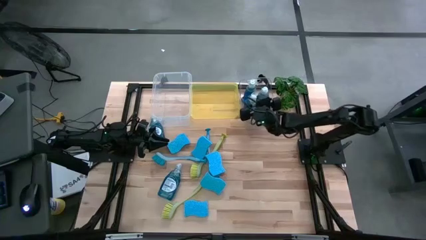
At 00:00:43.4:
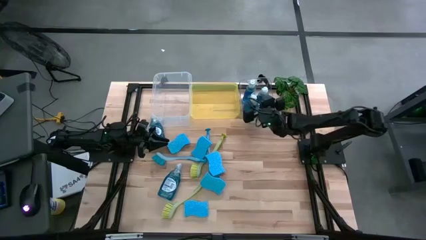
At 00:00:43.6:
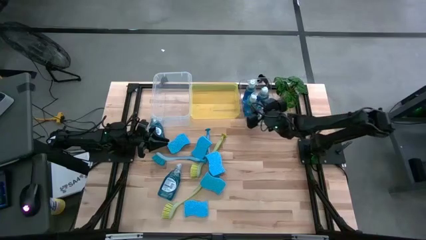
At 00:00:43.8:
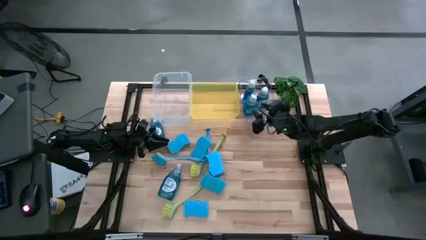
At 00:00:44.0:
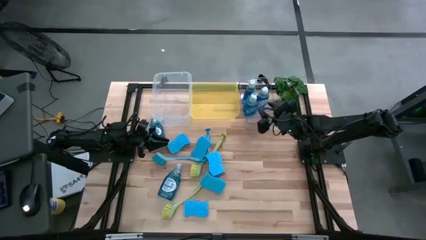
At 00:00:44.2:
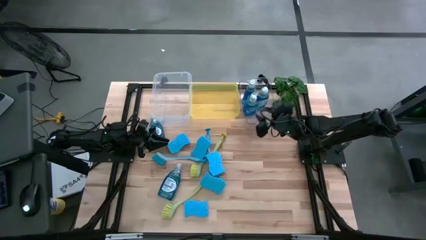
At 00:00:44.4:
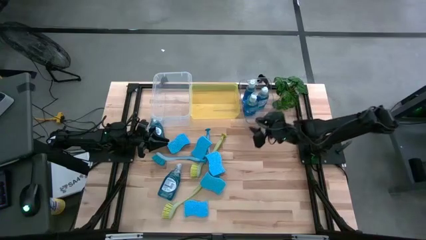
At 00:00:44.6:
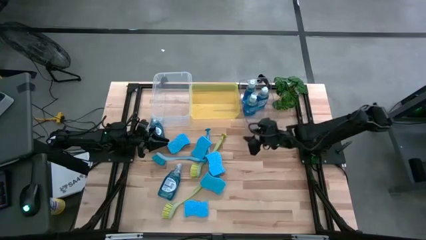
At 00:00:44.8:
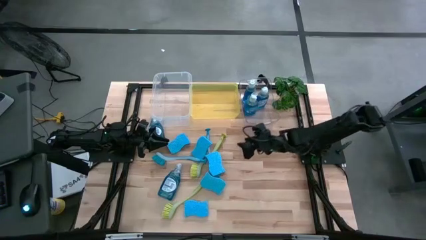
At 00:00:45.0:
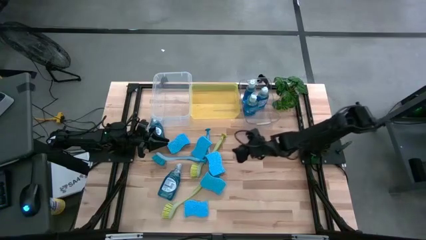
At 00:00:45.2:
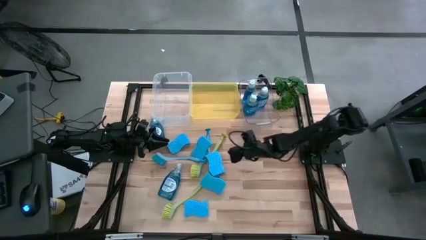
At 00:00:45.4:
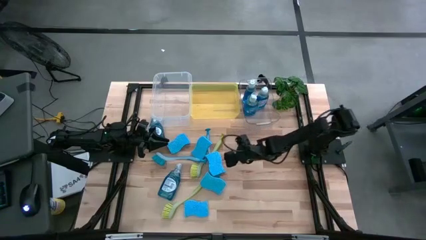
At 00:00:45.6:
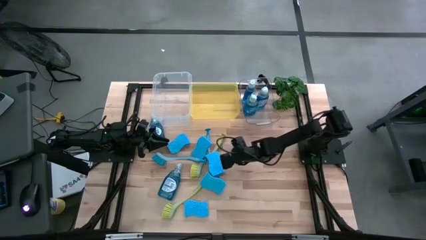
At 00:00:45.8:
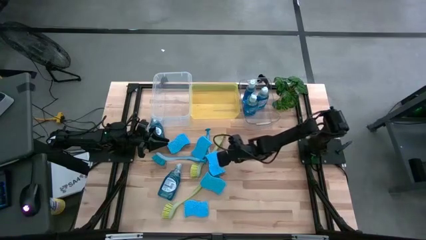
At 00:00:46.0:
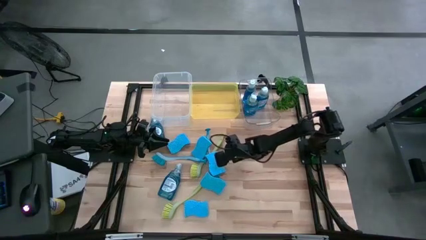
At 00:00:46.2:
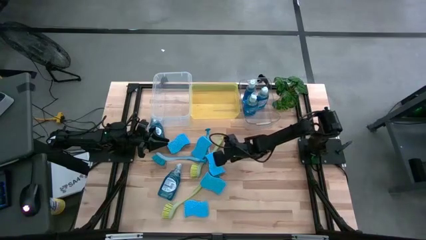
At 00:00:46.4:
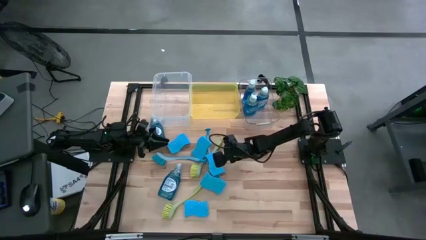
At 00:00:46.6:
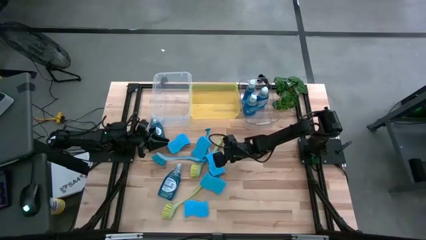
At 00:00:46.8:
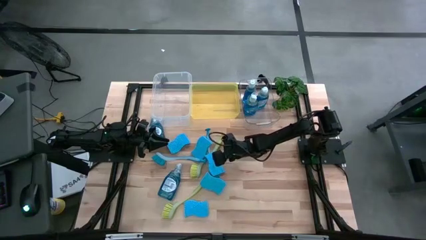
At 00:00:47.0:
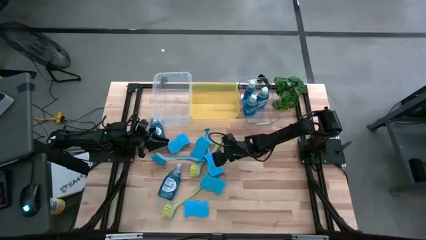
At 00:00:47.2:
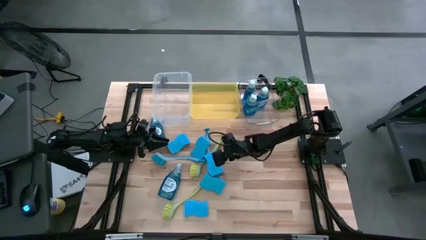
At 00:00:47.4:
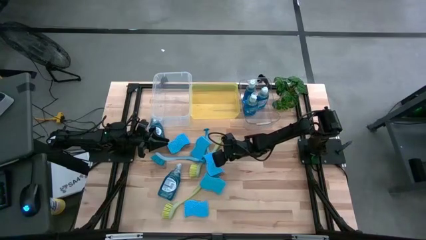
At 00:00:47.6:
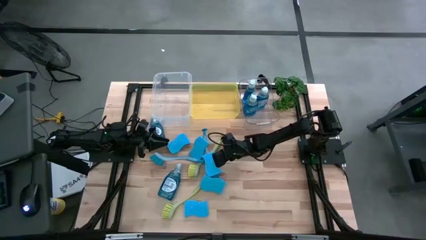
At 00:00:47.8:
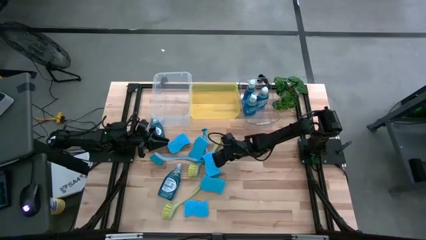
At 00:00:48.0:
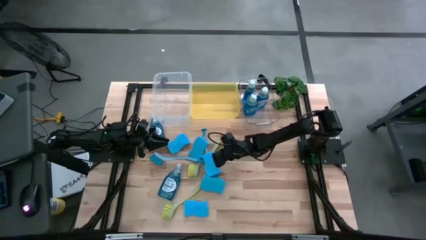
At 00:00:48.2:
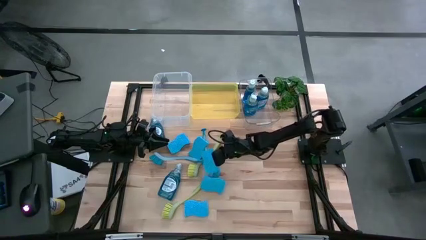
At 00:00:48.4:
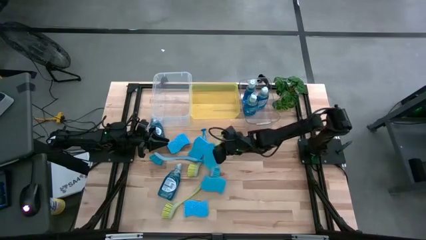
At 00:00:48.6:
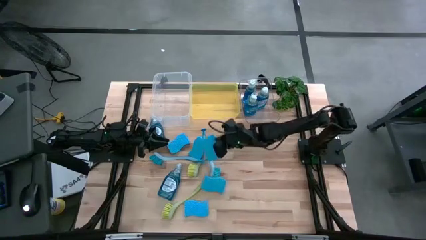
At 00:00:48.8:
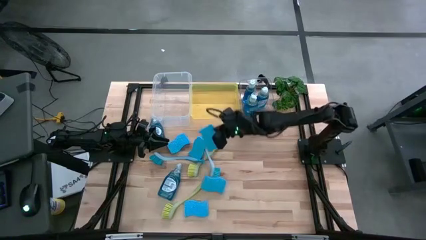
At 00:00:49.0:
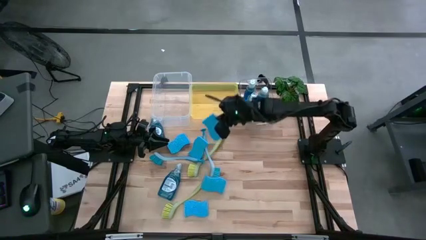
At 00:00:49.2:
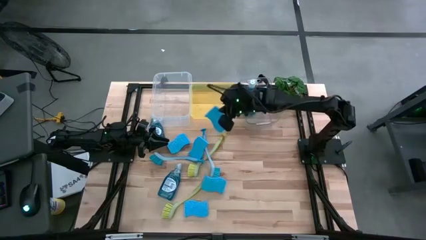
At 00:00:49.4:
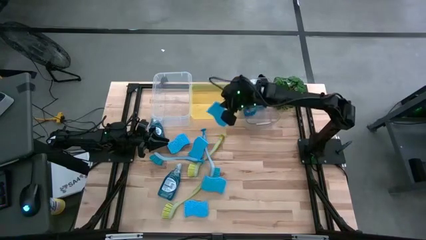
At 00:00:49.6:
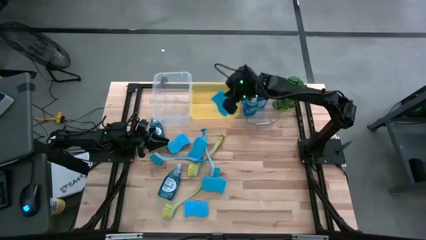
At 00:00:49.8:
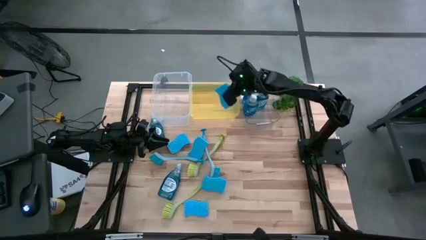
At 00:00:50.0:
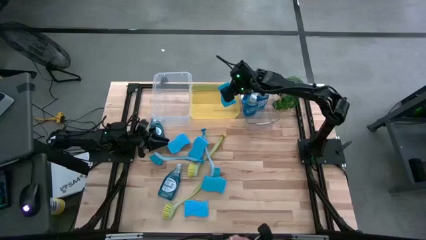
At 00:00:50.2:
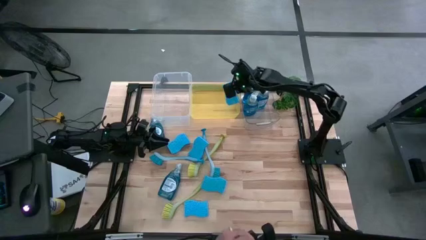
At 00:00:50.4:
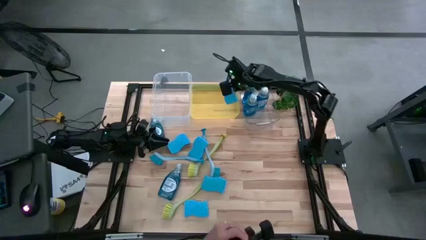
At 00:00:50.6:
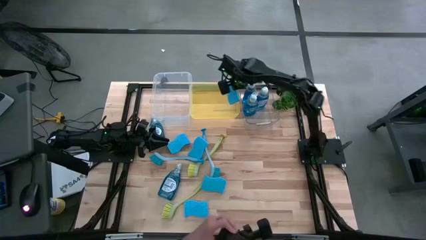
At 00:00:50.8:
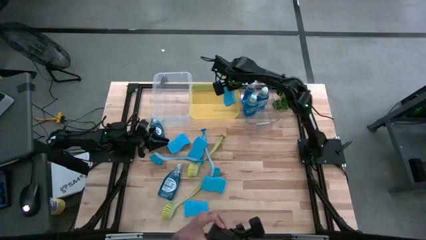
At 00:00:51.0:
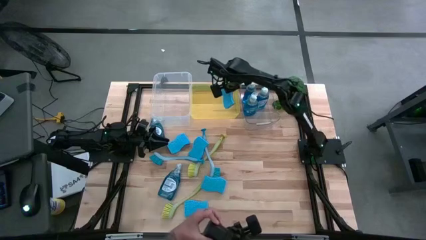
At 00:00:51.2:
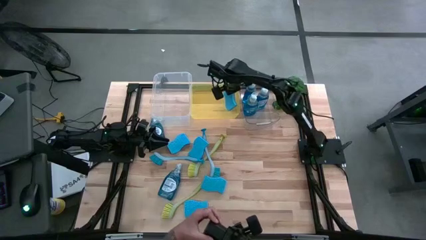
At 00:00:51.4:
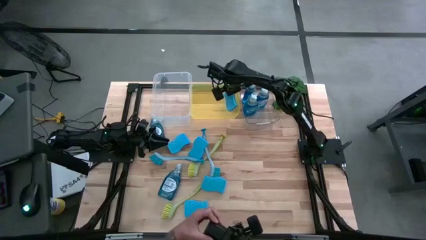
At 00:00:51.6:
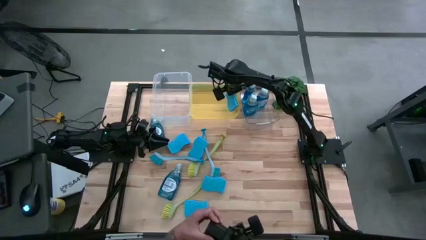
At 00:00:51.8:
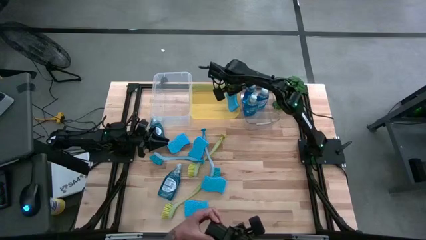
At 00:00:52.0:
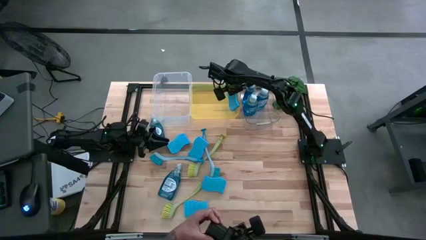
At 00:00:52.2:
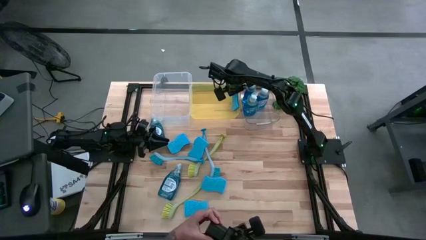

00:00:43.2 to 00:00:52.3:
Task: Pick & Place Kitchen Sink Supplies
Put the blue sponge into the yellow bin

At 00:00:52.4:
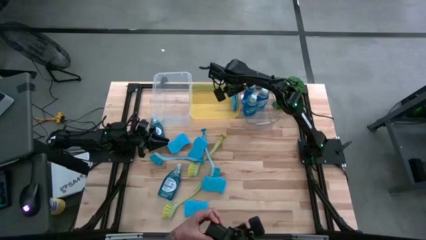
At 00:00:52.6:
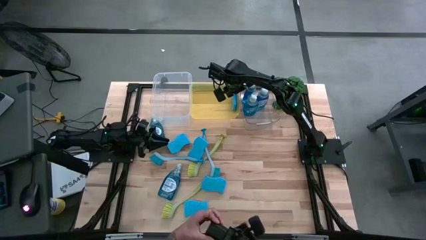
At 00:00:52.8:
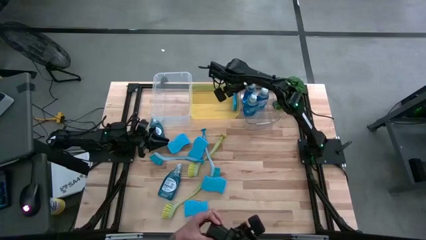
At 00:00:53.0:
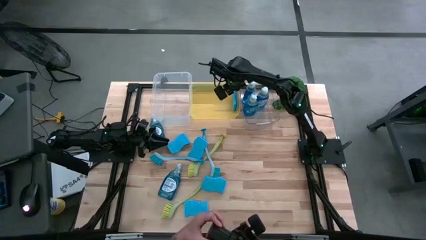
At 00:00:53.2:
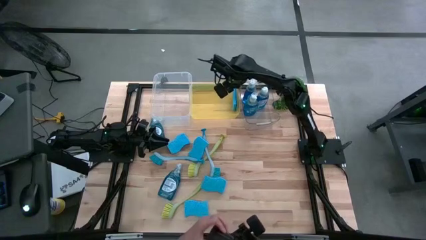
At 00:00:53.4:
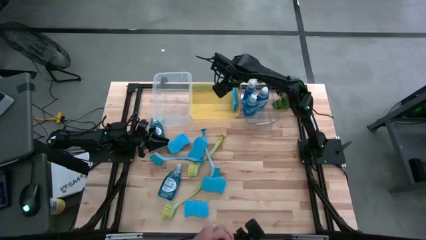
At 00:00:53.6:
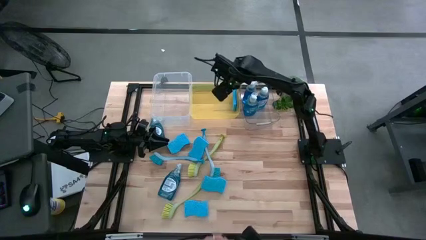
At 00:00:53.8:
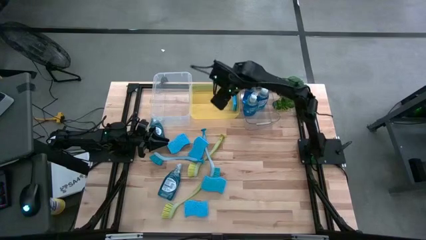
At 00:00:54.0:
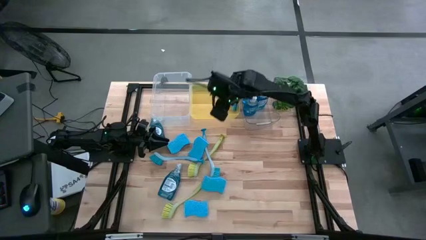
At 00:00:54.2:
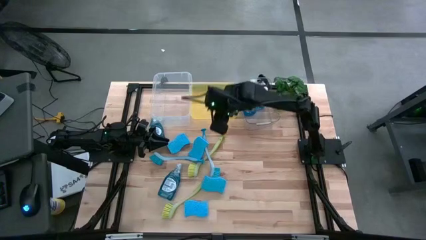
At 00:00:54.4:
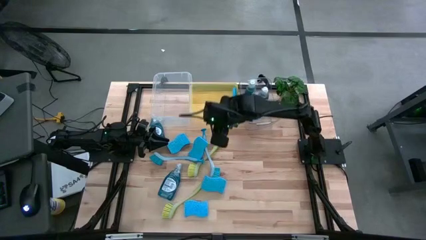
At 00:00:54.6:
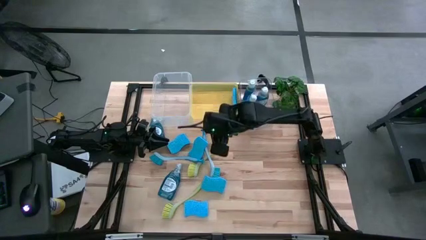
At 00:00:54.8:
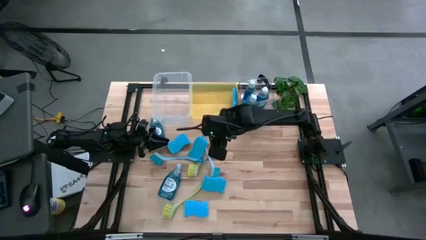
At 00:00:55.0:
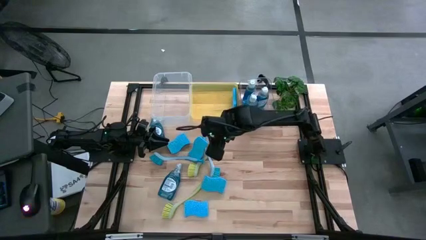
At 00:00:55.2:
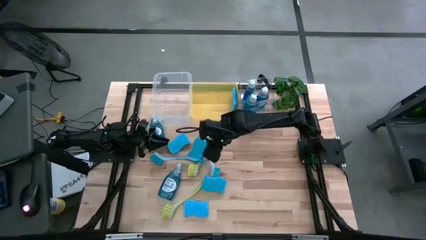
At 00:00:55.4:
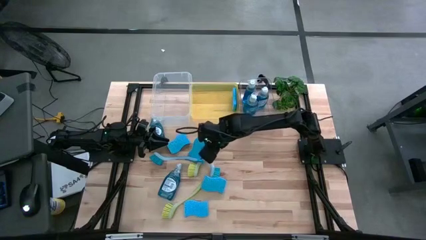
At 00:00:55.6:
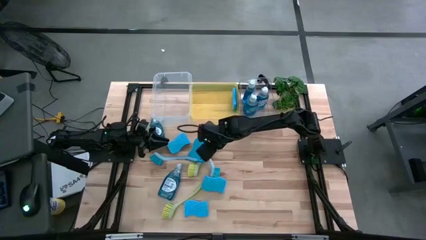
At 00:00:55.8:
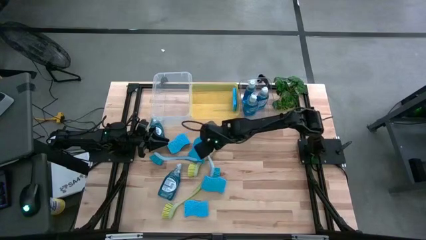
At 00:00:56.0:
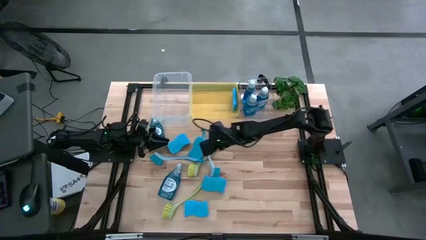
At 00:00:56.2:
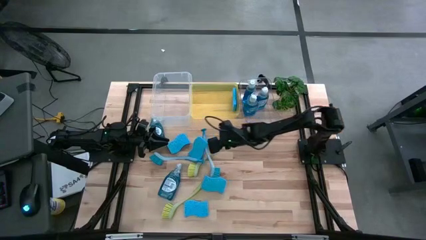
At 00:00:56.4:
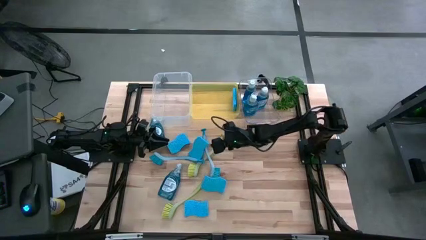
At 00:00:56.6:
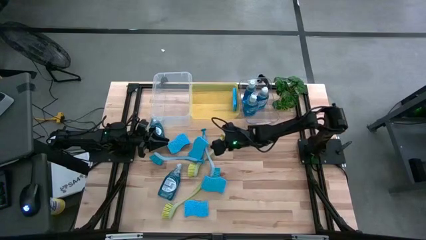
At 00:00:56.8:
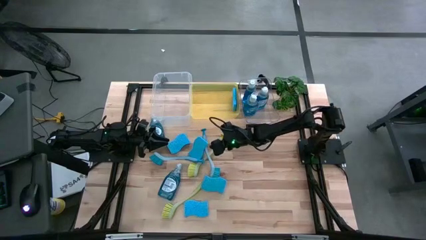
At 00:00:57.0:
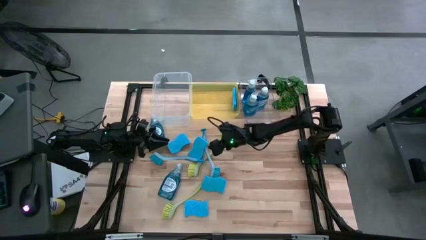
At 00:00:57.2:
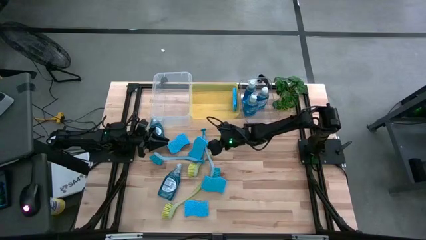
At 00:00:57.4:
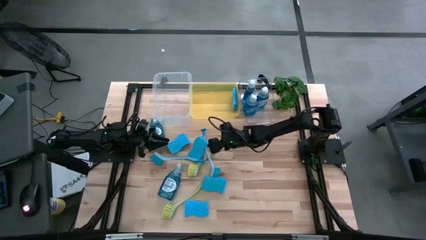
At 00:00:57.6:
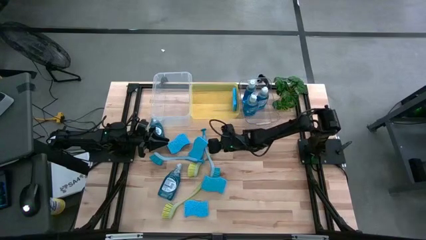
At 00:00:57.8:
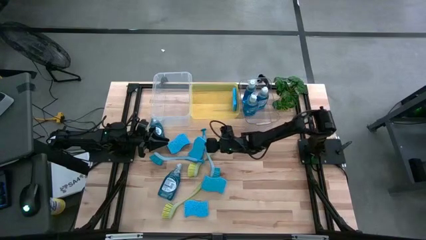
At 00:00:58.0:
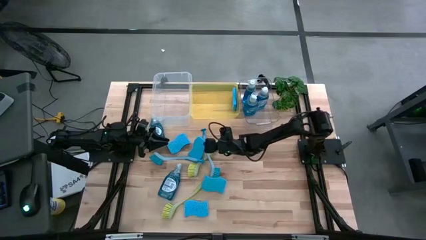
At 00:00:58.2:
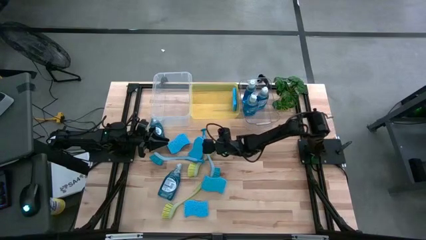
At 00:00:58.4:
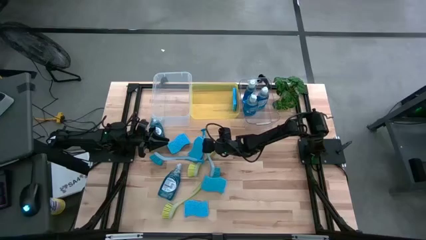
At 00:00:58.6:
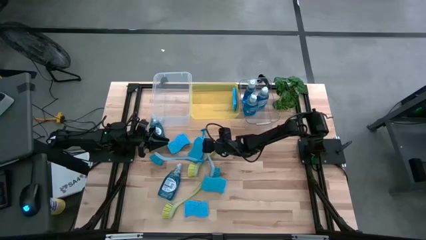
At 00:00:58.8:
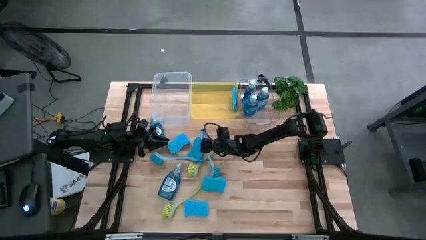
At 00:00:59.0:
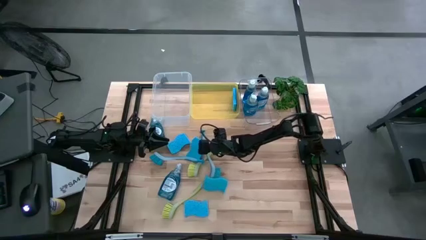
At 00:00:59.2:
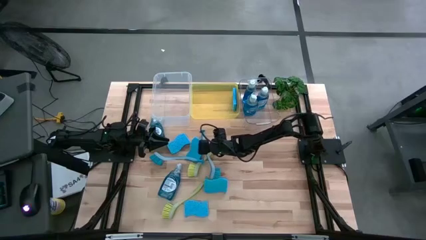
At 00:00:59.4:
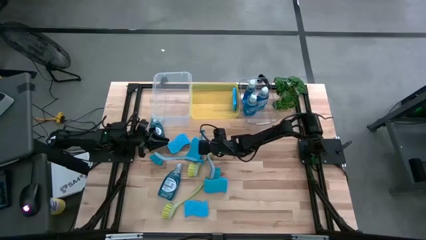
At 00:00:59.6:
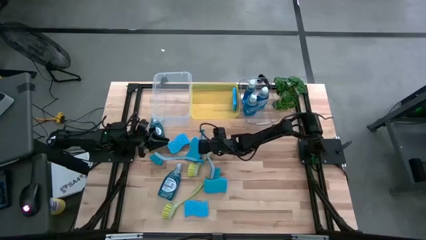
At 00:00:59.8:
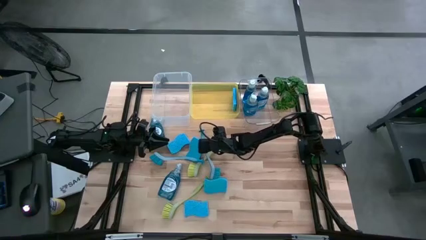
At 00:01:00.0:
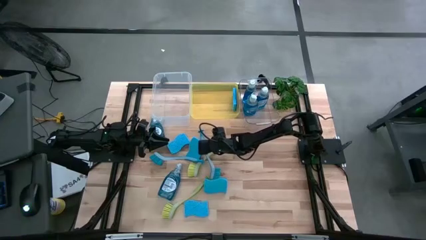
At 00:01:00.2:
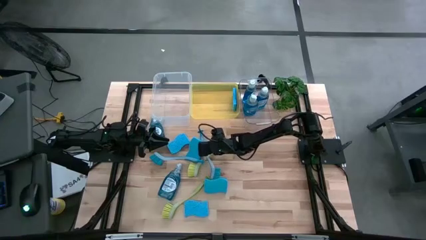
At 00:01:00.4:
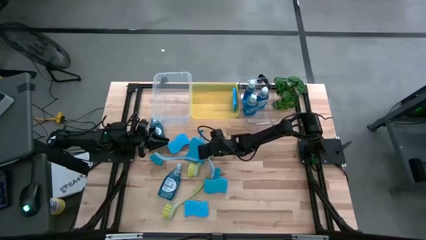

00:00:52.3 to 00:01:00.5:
Put the blue sponge into the yellow bin
